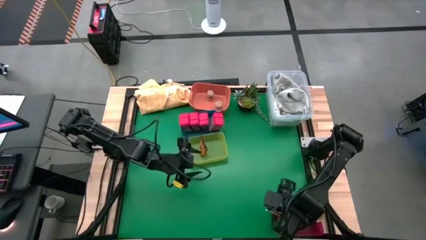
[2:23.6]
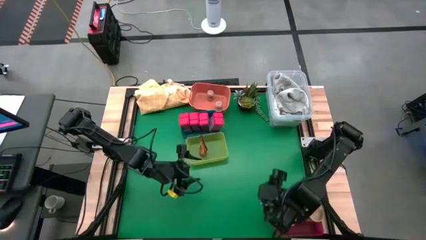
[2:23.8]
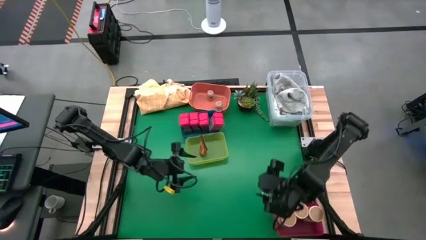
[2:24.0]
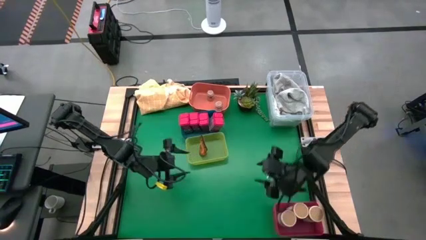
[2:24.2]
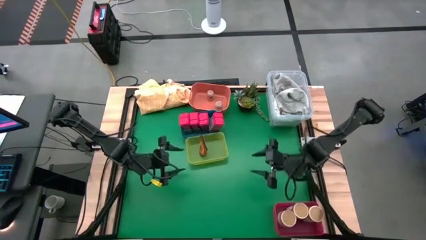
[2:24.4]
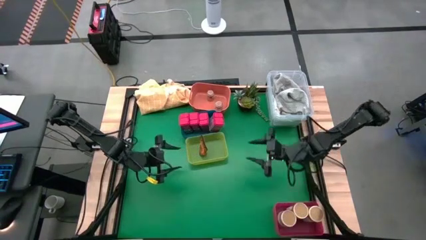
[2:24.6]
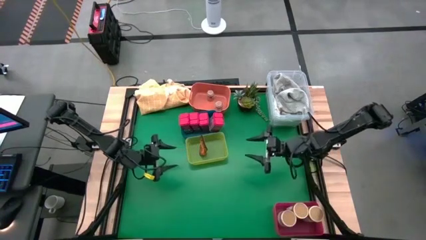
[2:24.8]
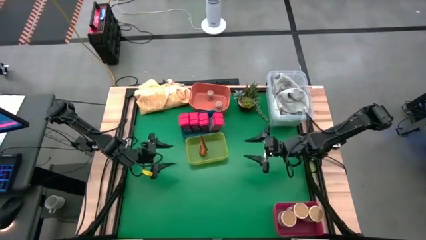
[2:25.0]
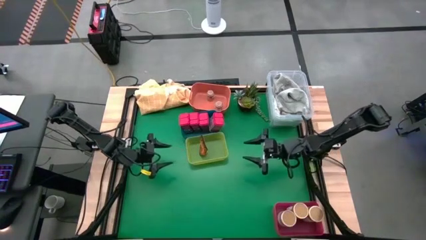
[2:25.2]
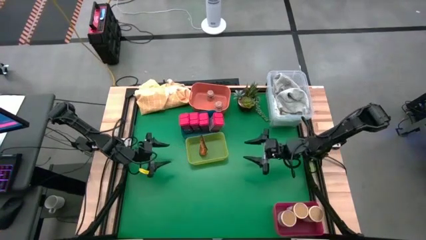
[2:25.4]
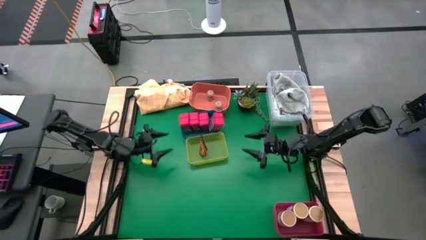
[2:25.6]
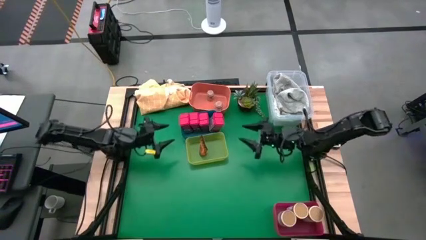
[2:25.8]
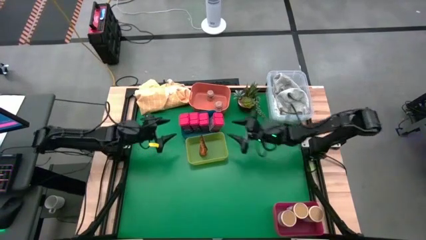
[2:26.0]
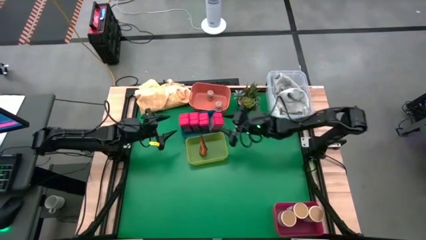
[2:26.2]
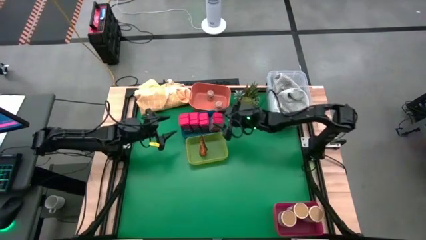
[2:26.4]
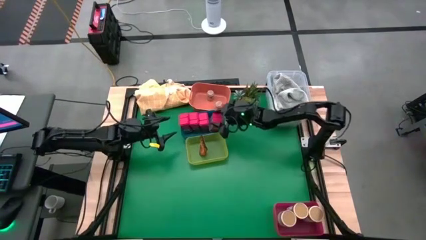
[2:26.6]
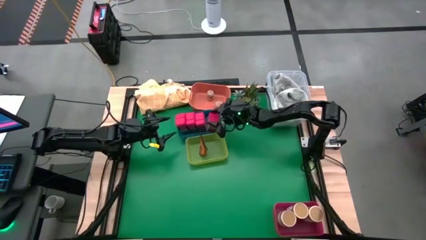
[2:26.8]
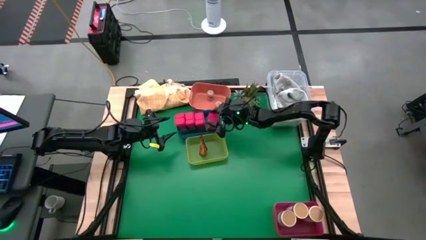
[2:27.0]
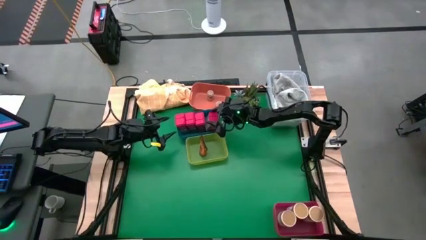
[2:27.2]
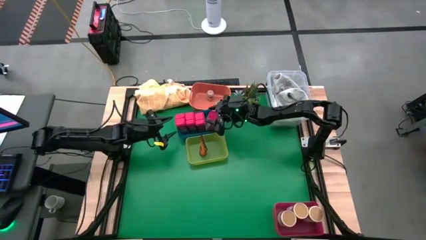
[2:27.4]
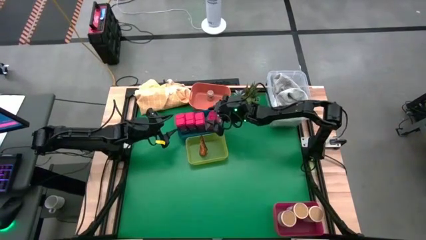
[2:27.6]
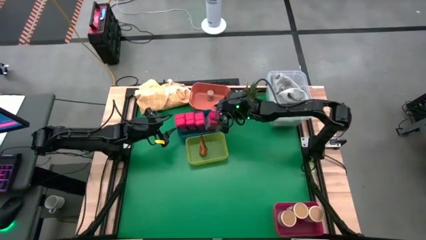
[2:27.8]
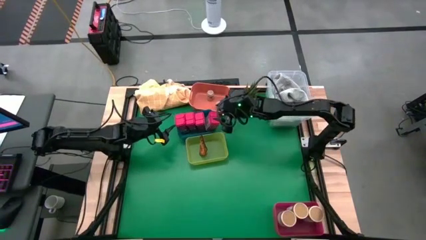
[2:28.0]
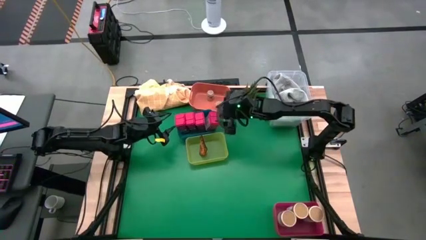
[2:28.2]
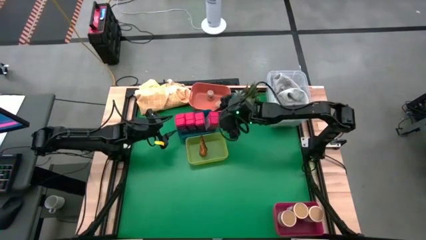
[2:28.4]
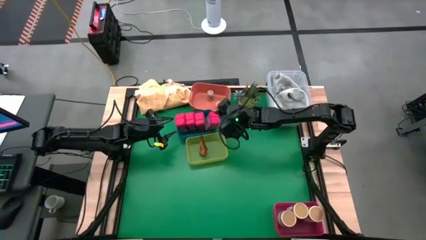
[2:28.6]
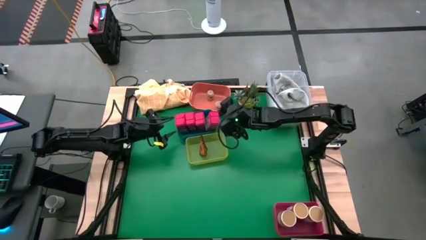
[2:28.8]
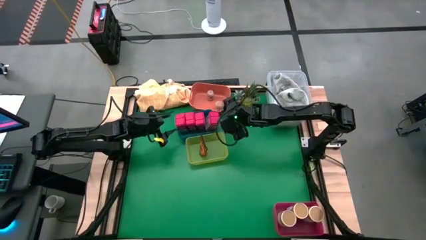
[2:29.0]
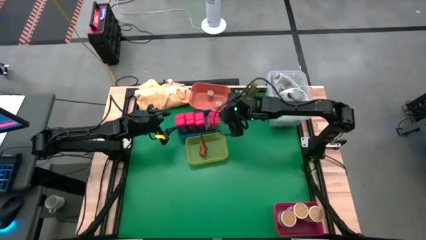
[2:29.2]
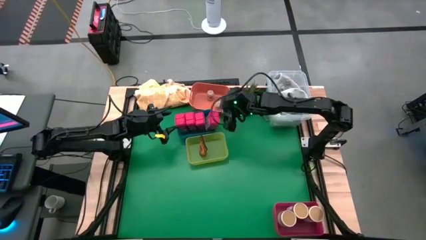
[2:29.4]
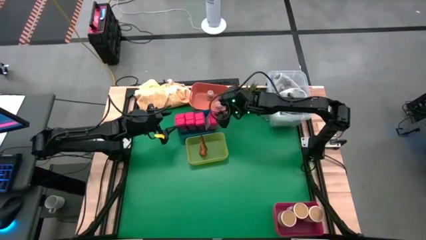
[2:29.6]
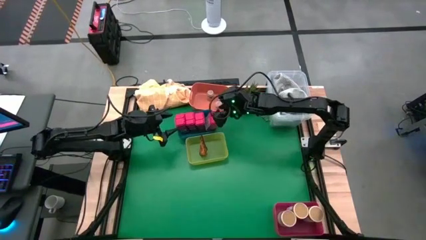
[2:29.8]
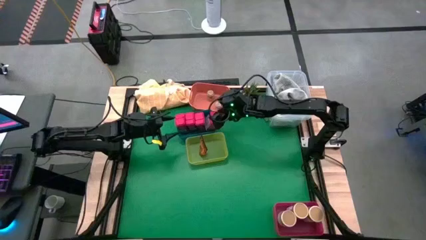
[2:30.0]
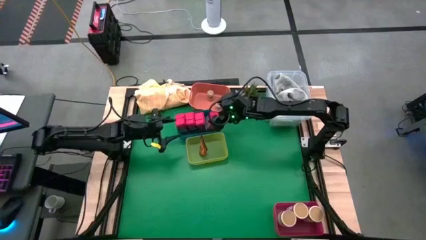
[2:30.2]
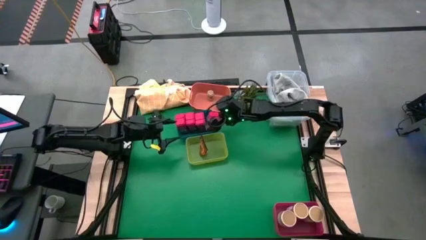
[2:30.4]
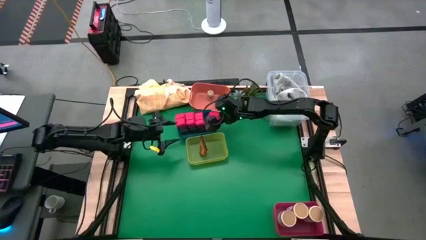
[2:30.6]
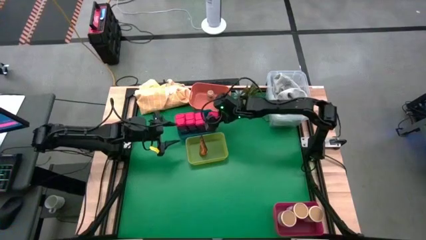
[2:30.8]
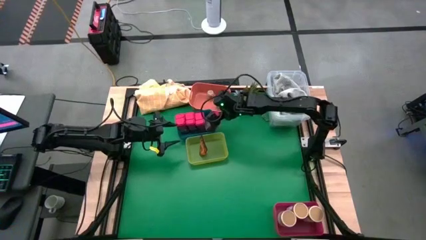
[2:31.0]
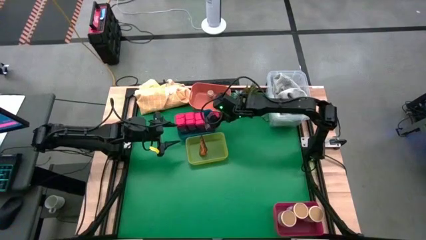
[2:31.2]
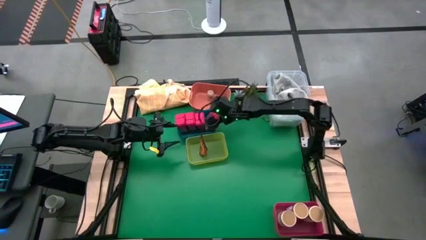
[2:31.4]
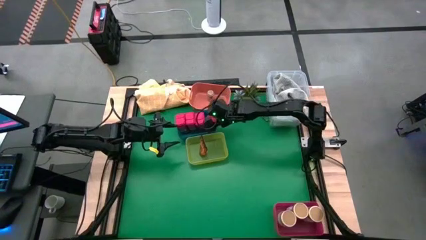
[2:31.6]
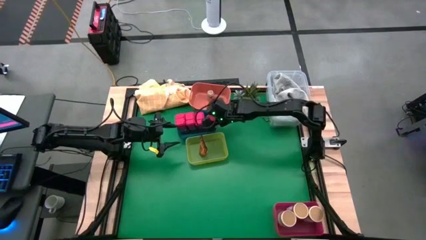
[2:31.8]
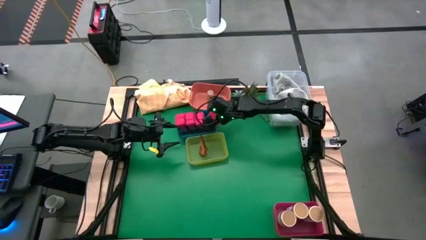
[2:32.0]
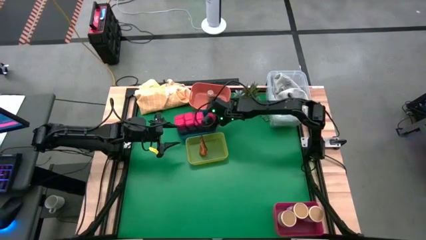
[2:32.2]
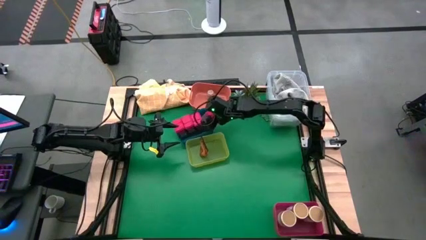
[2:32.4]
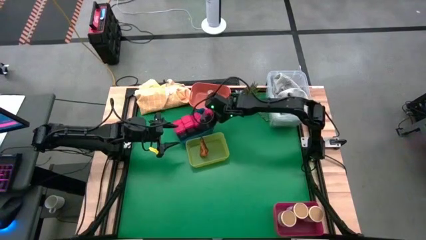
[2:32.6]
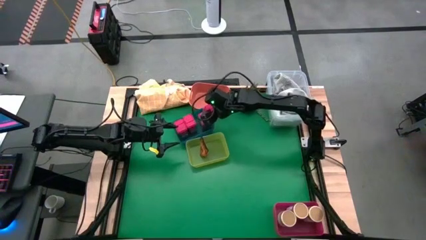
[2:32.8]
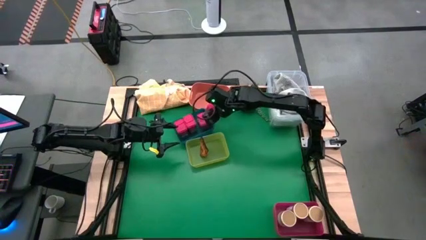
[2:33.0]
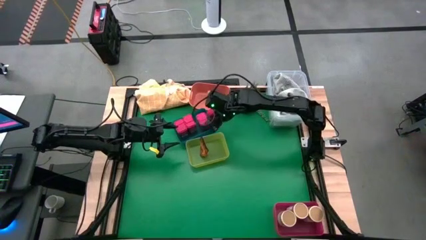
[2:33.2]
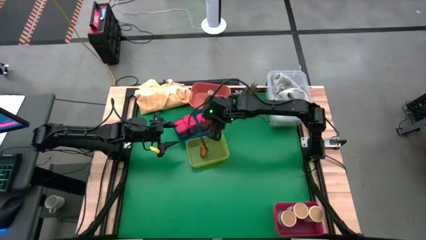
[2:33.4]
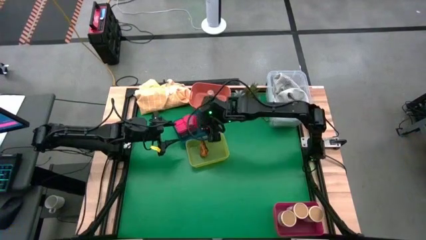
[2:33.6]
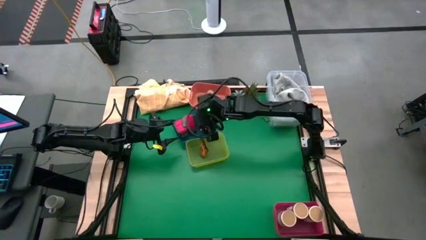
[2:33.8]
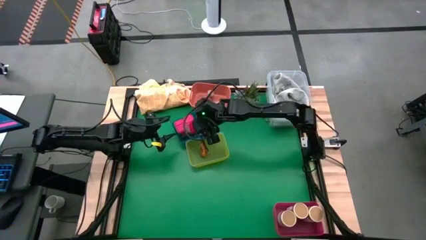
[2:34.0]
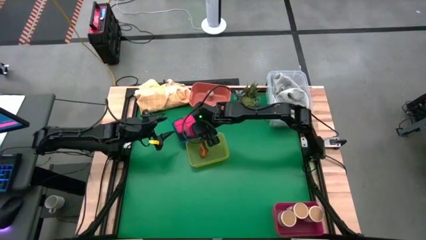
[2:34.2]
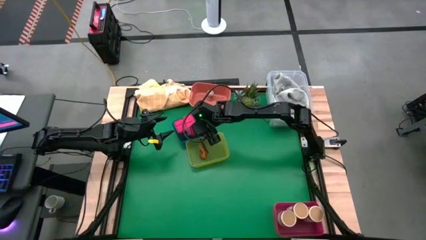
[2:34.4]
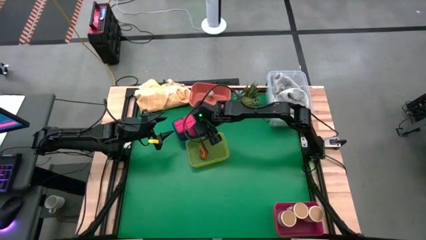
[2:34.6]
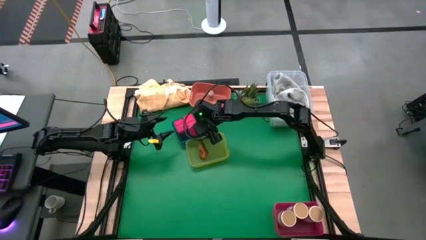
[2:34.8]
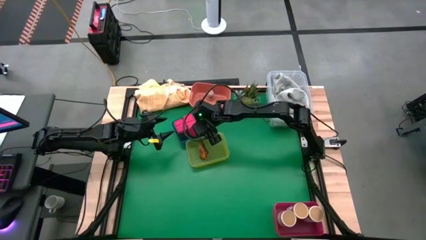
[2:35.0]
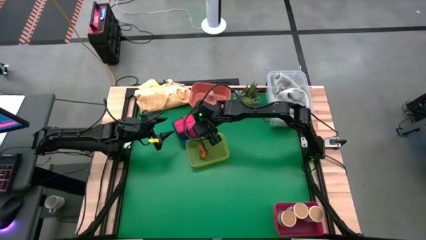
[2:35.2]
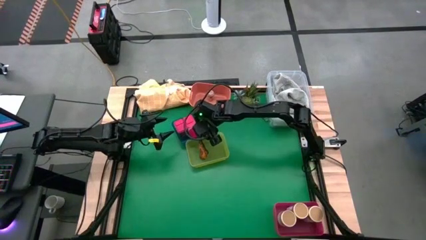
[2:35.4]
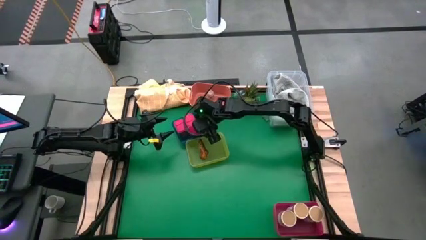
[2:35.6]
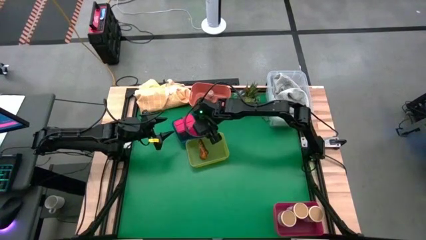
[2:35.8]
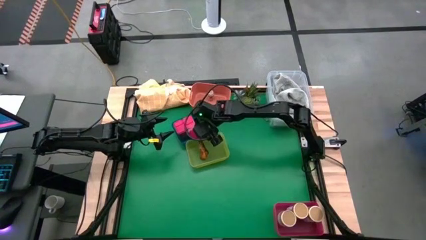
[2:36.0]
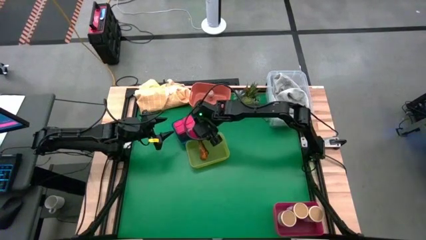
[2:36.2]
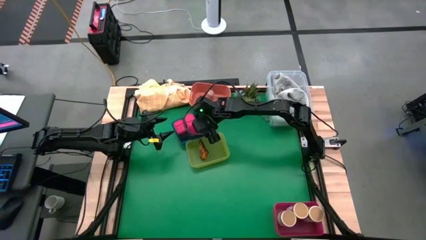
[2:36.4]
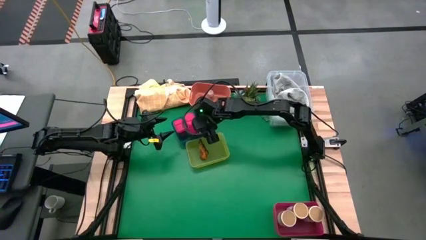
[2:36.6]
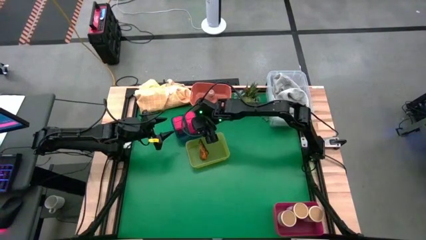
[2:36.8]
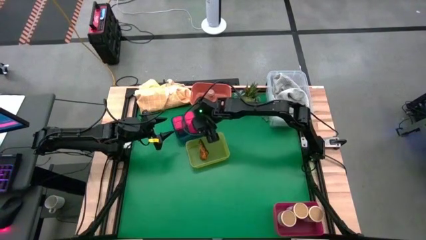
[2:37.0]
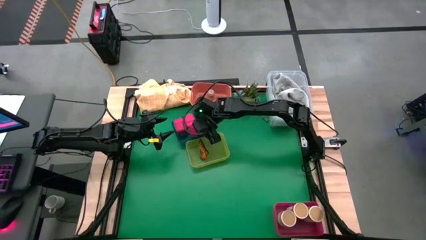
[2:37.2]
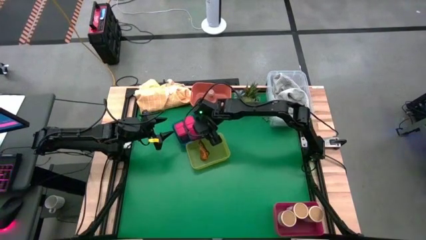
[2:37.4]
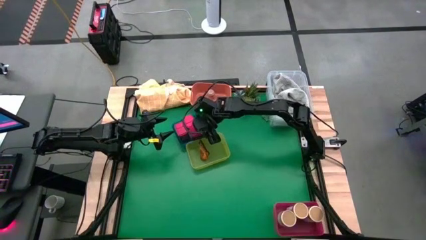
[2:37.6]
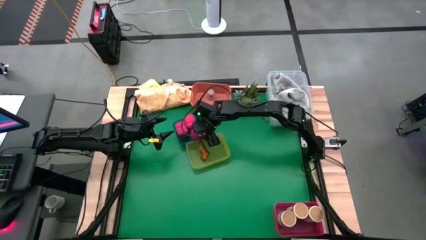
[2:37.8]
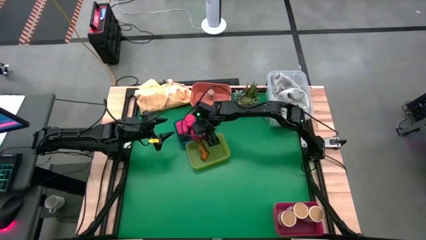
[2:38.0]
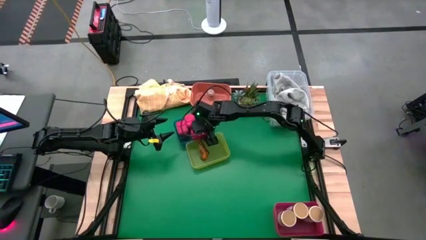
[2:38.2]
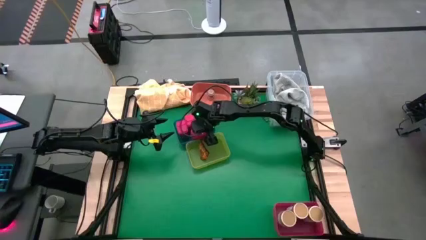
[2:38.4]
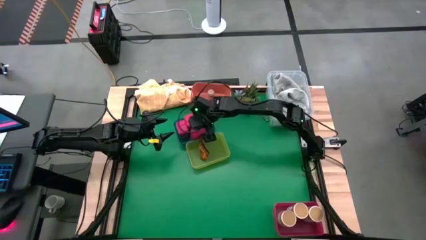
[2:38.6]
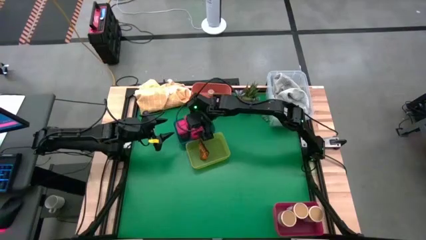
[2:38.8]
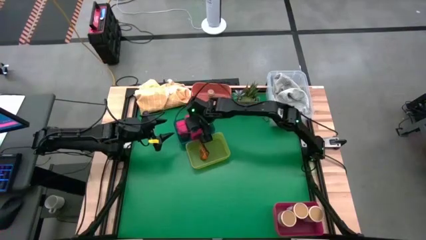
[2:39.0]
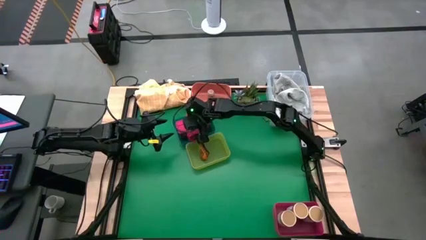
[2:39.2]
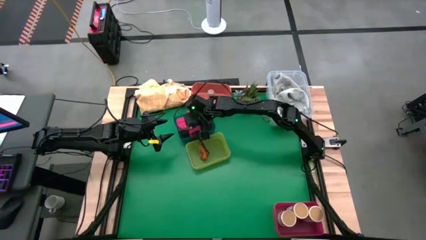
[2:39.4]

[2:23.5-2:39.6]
Task: Sort spices by type
Adjust the red seasoning can
